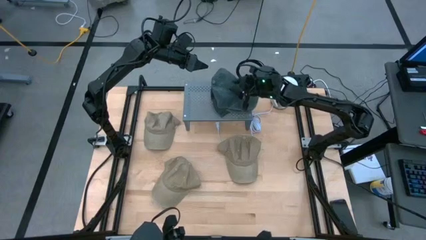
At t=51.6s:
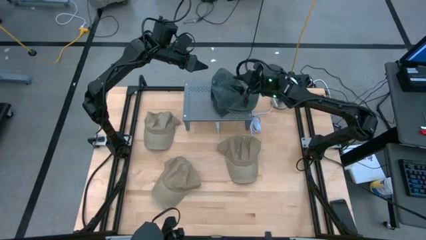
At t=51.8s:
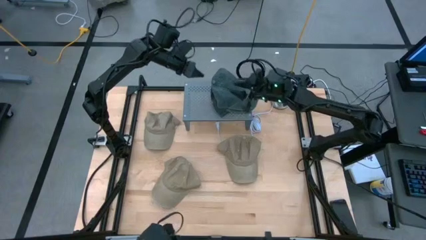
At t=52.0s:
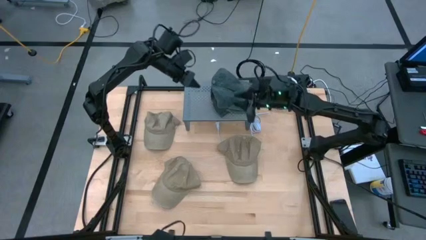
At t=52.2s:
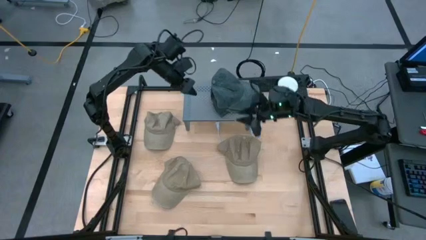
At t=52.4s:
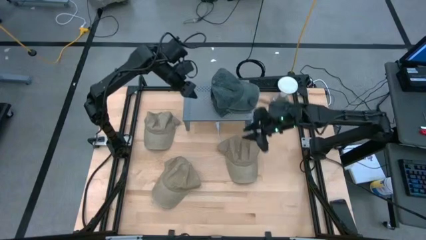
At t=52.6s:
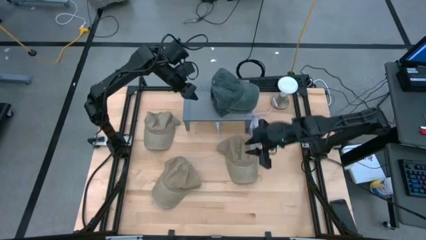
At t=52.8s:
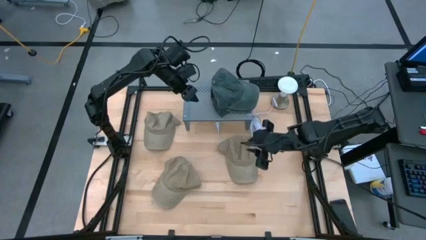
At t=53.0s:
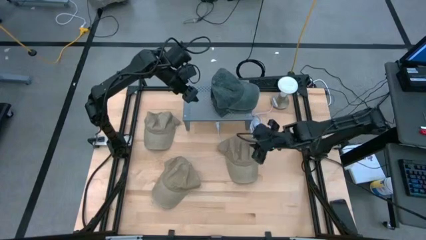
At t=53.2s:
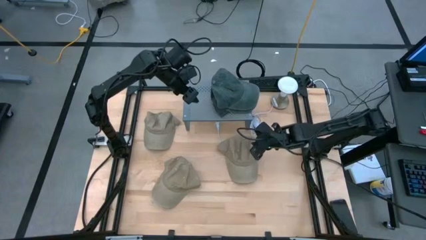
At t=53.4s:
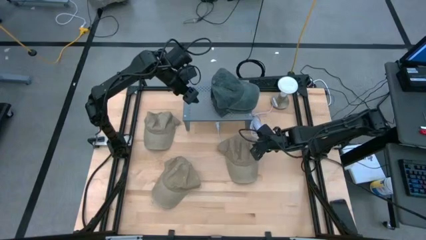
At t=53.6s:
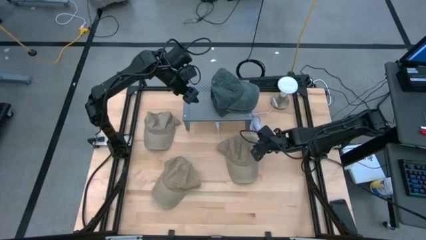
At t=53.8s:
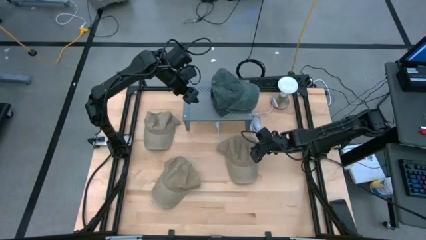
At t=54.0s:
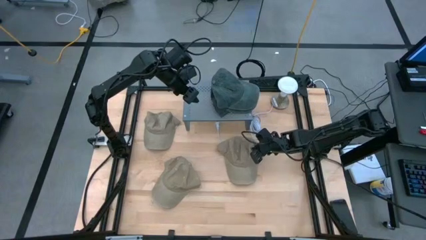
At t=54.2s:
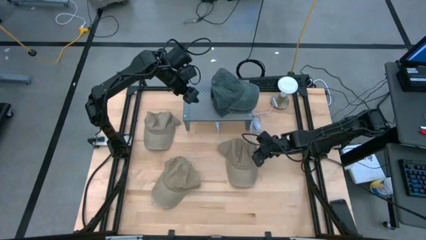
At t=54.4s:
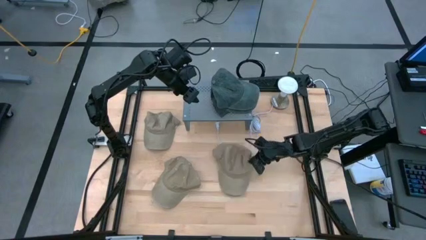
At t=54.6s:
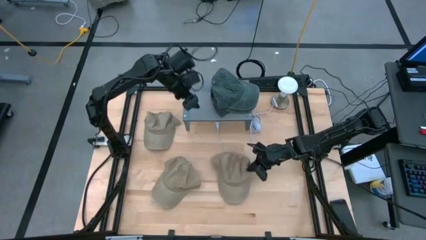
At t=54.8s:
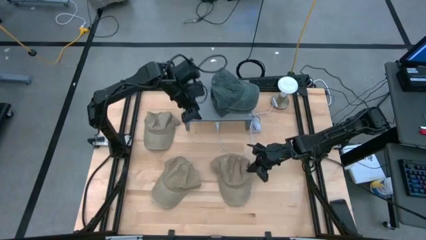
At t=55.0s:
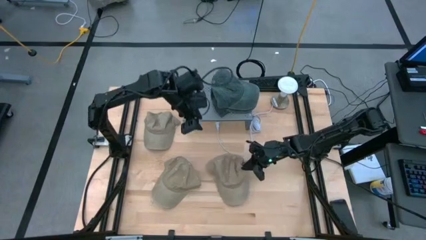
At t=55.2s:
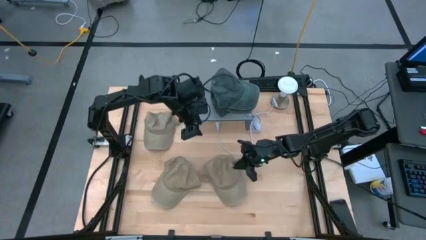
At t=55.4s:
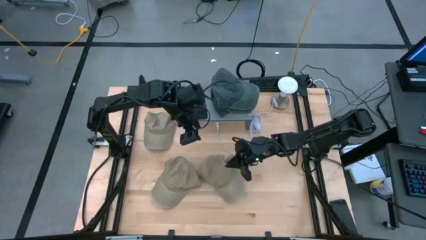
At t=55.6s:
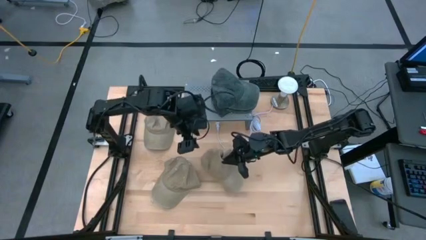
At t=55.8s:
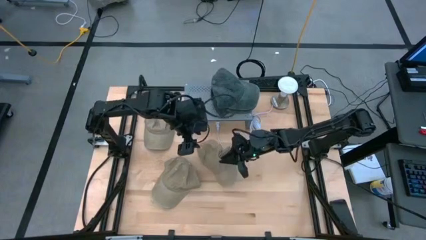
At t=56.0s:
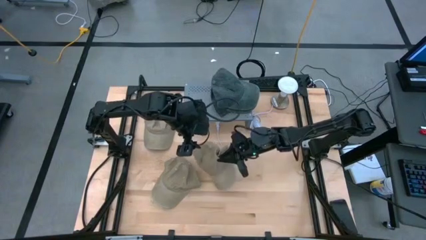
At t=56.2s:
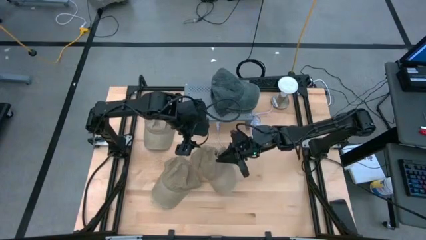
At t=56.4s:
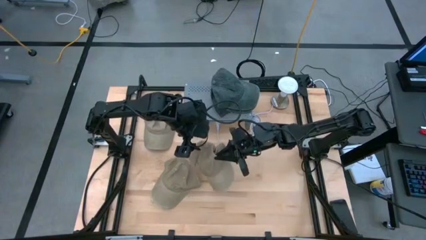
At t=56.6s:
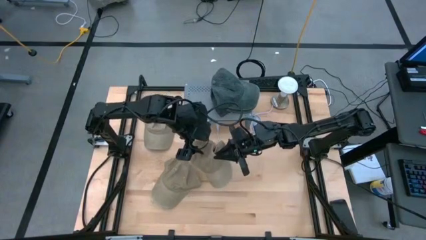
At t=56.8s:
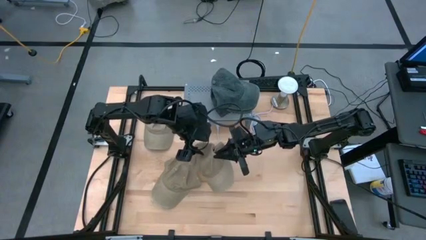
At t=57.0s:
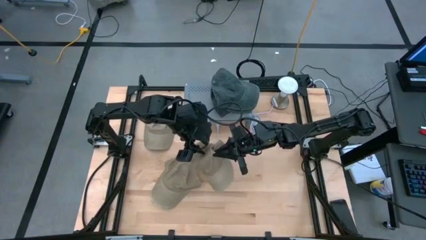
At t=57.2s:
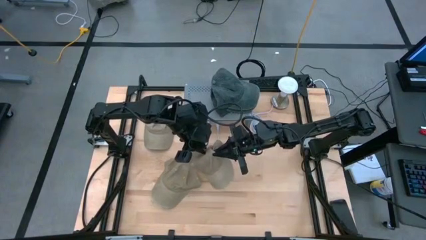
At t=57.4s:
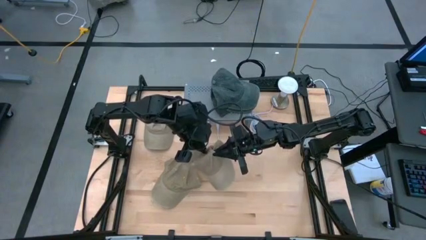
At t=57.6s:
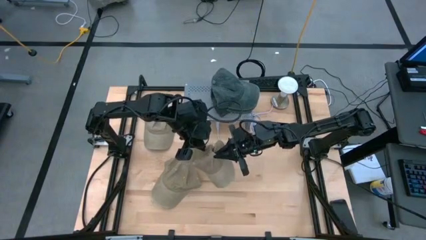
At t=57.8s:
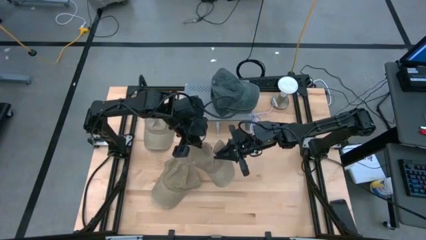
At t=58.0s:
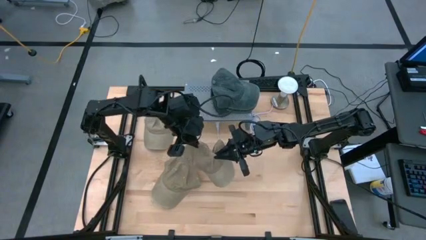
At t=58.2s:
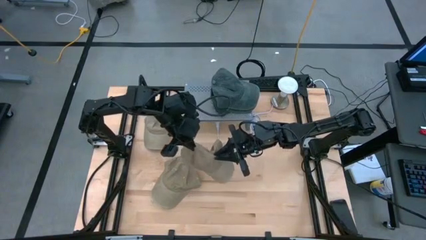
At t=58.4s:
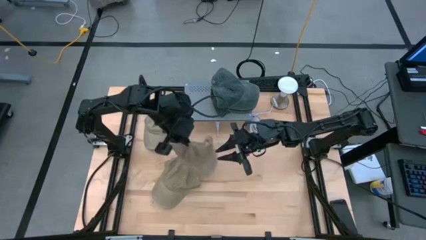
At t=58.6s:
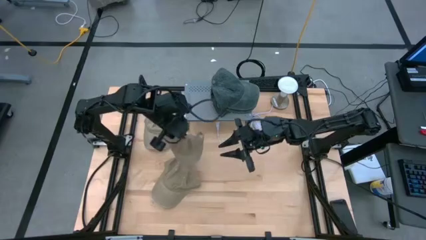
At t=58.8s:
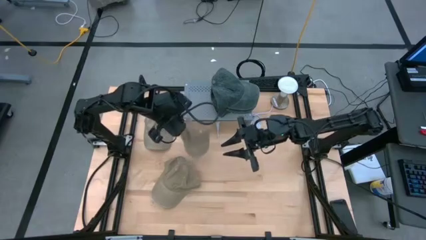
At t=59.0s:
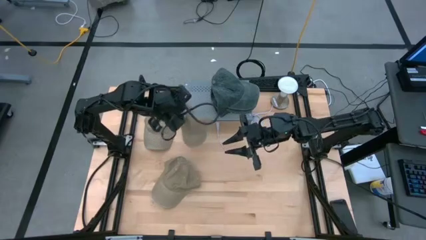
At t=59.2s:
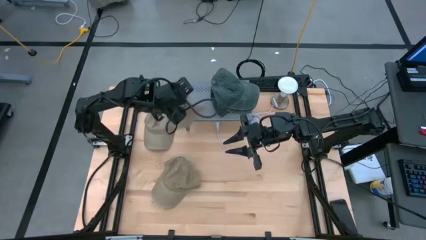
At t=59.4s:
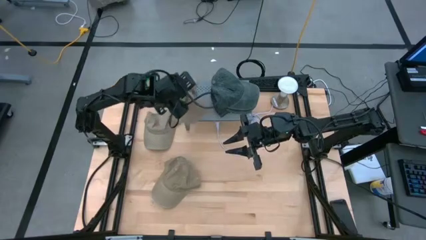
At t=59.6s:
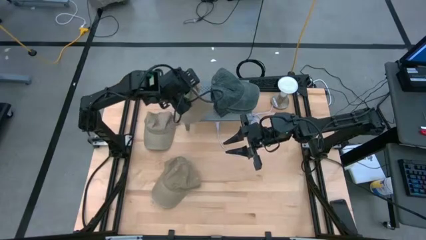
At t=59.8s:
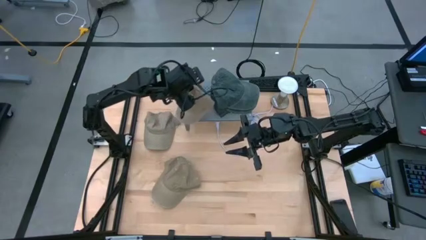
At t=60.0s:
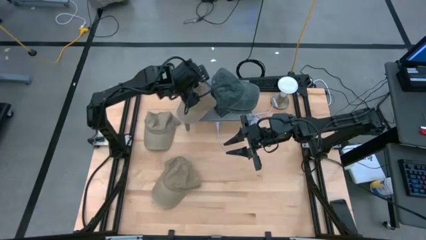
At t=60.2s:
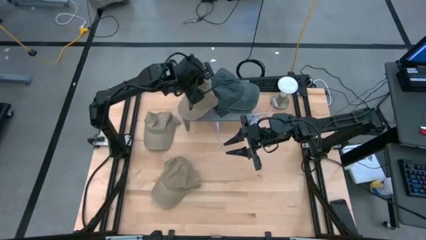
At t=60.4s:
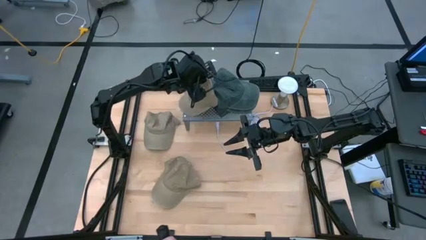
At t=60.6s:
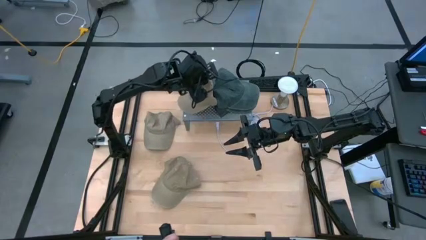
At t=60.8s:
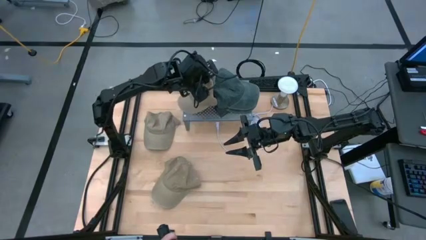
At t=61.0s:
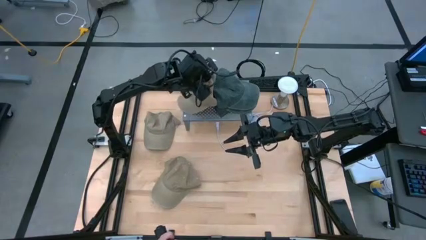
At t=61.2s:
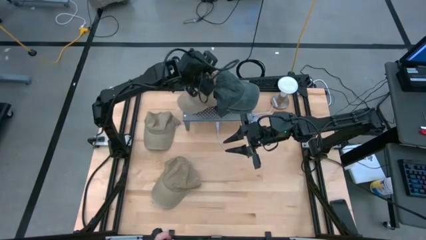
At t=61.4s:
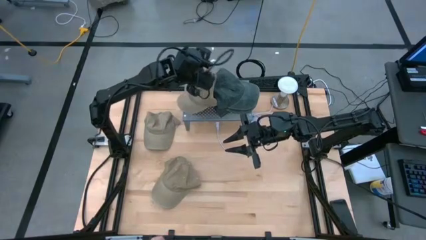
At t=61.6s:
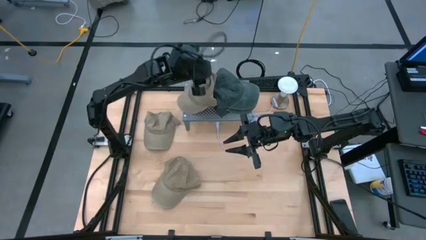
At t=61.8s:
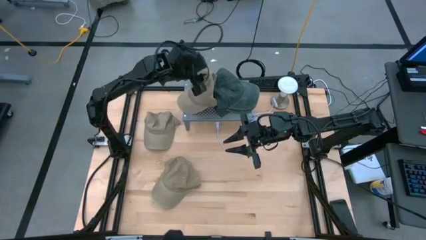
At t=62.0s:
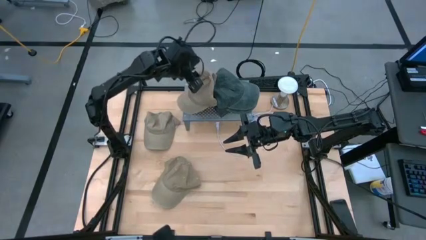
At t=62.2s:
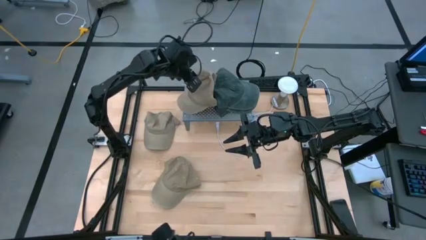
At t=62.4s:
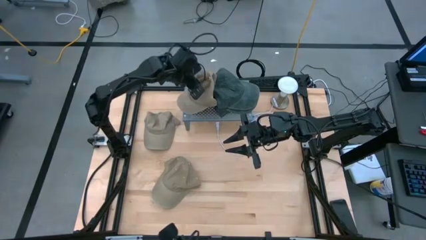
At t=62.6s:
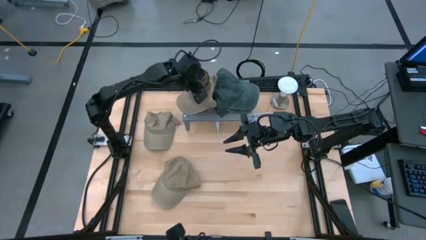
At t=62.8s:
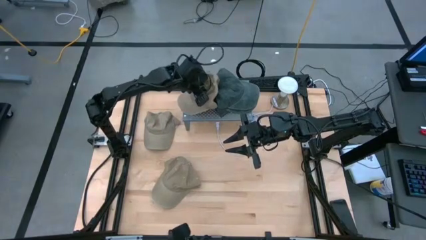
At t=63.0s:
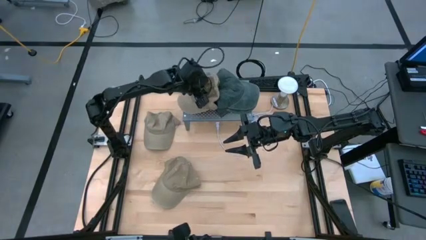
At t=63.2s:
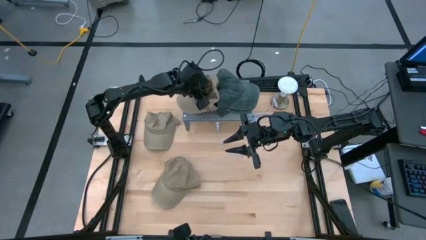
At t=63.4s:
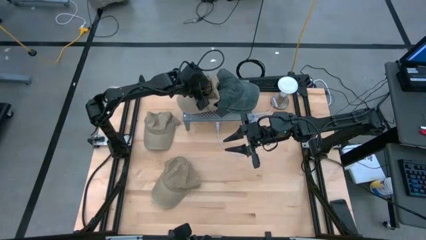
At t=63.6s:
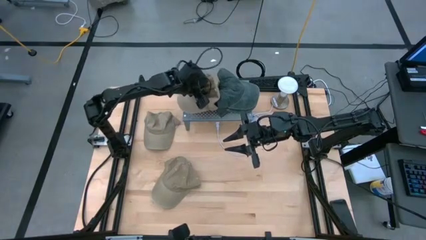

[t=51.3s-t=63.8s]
Task: Pick & Place hat
Put the right brown cap on the shelf

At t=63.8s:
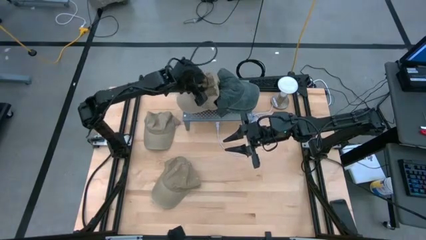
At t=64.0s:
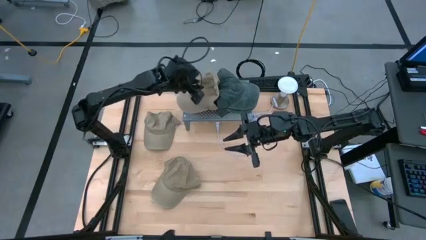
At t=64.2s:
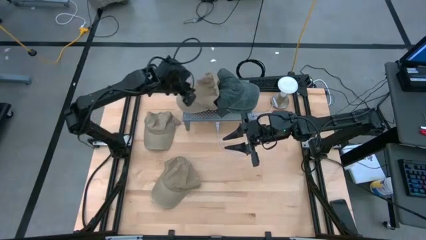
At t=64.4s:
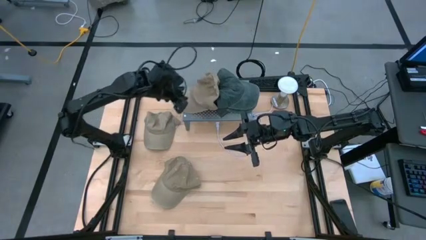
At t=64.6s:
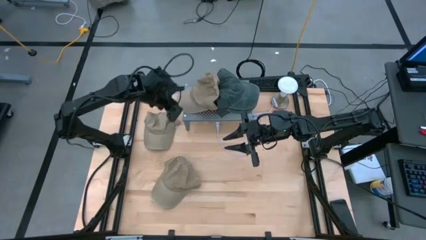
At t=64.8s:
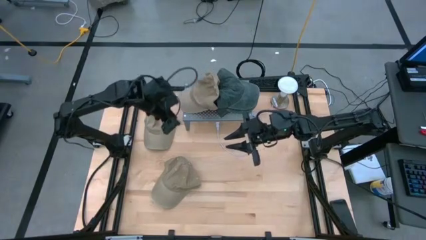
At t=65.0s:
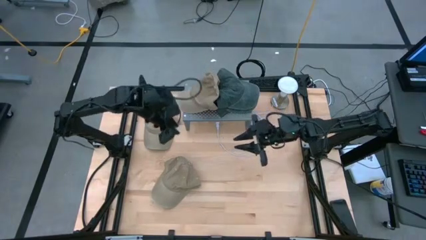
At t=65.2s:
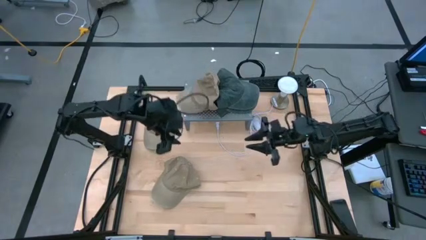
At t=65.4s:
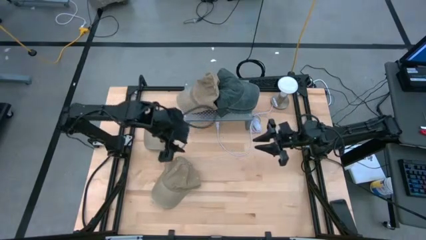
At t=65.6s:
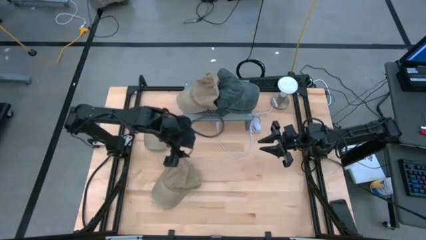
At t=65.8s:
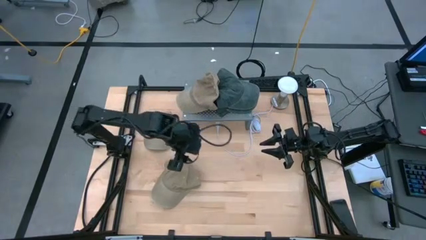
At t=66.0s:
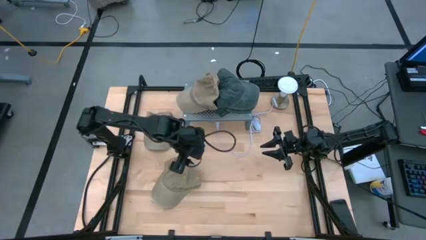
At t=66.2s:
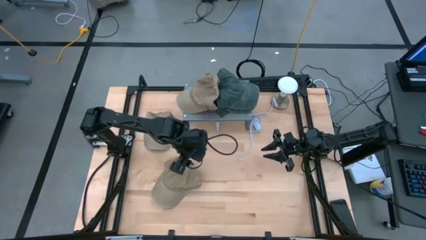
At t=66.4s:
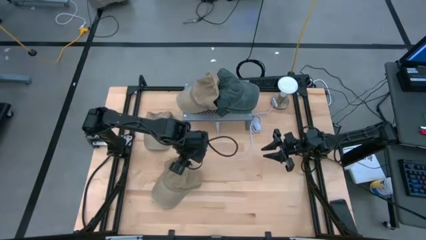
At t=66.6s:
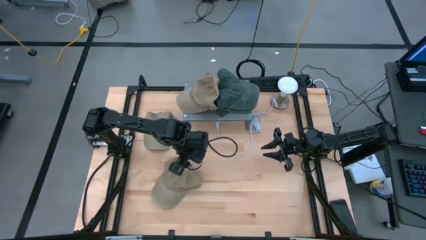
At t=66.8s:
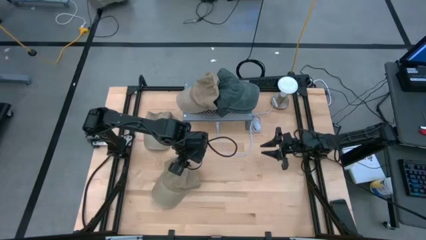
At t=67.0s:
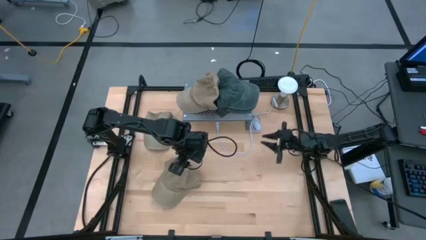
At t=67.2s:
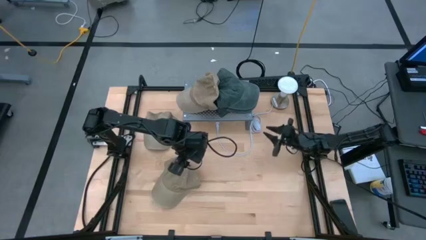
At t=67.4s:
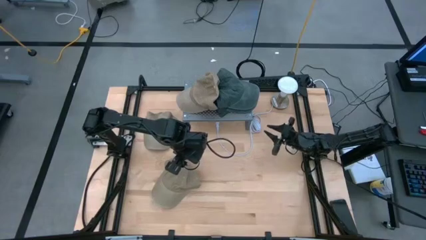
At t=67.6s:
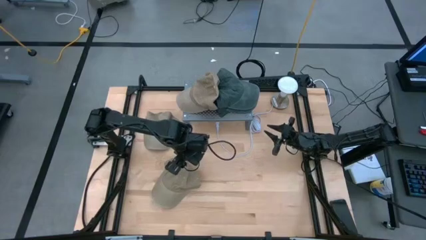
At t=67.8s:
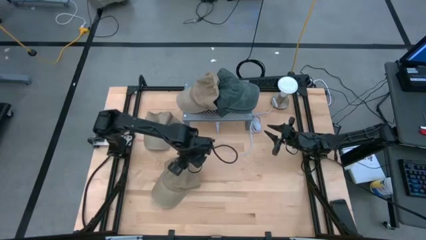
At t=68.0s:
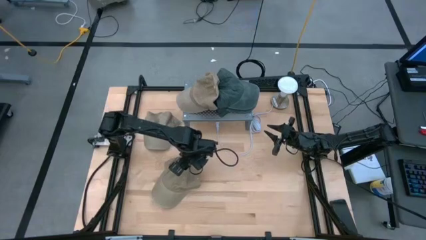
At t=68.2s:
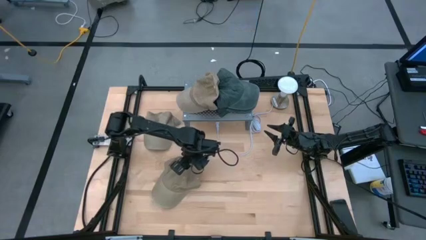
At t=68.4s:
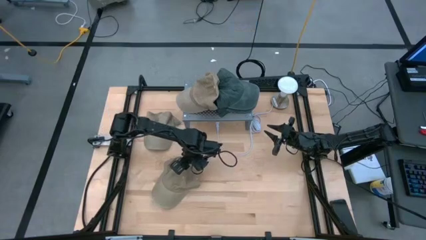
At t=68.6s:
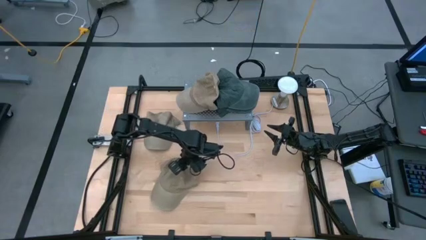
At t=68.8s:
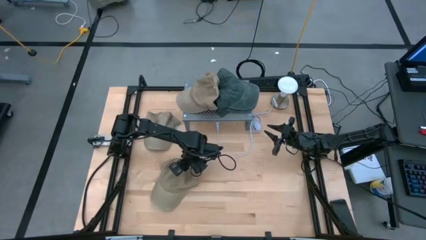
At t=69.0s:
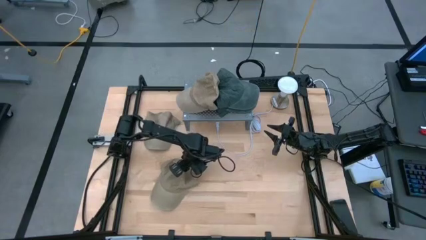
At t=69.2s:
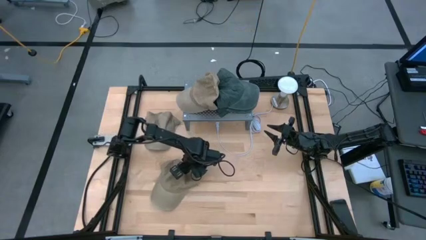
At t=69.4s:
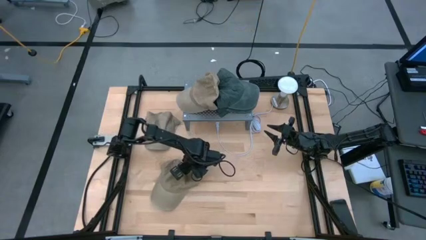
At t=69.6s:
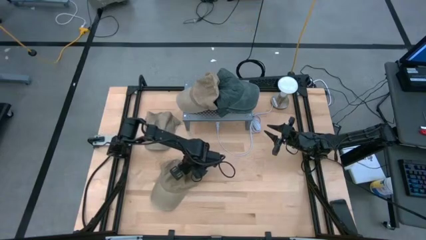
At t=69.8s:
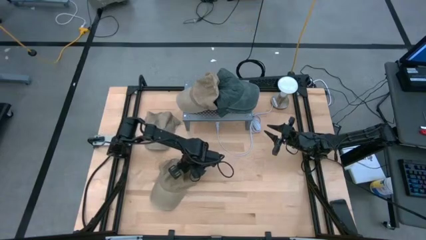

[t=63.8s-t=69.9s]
Stack the bottom brown cap on top of the brown cap on the shelf
